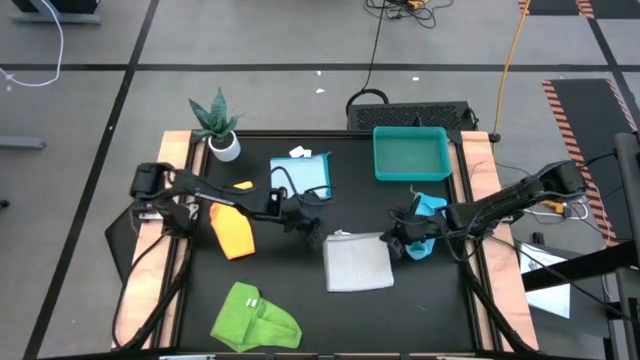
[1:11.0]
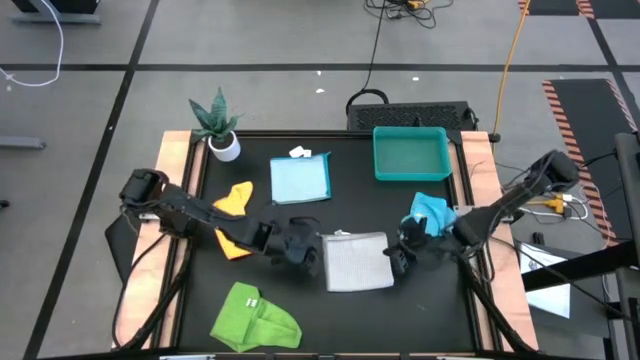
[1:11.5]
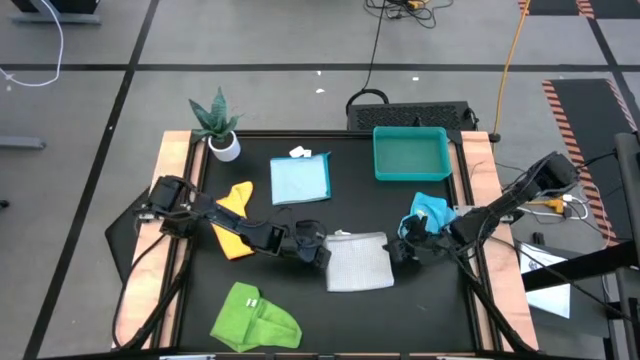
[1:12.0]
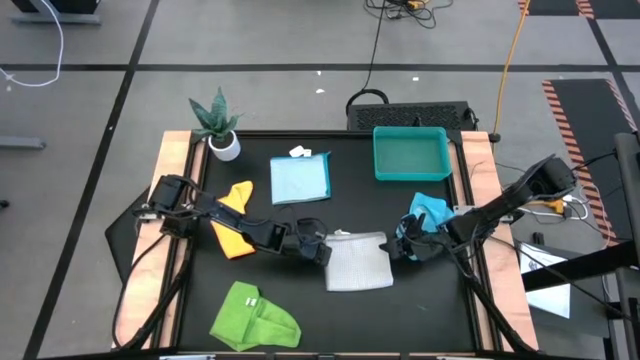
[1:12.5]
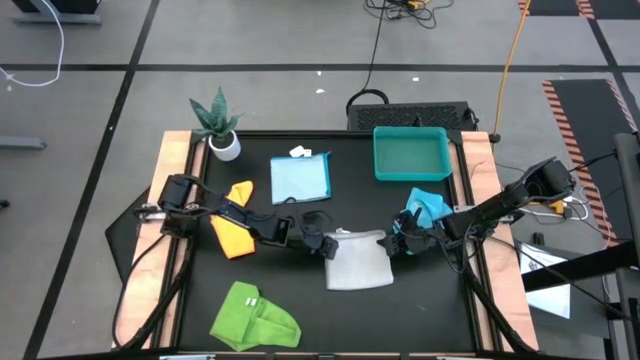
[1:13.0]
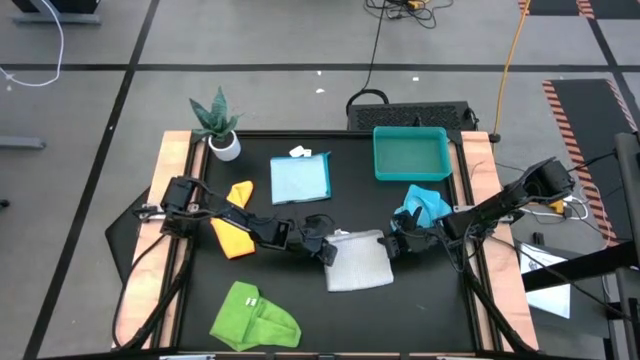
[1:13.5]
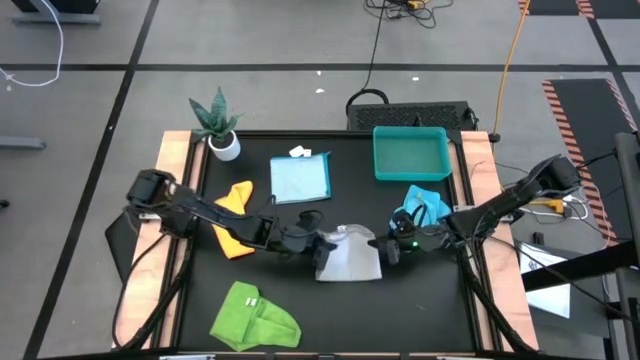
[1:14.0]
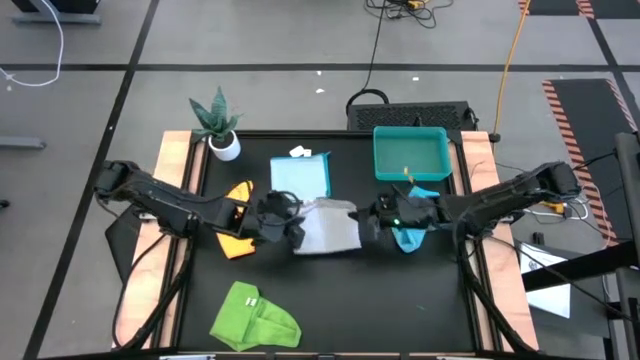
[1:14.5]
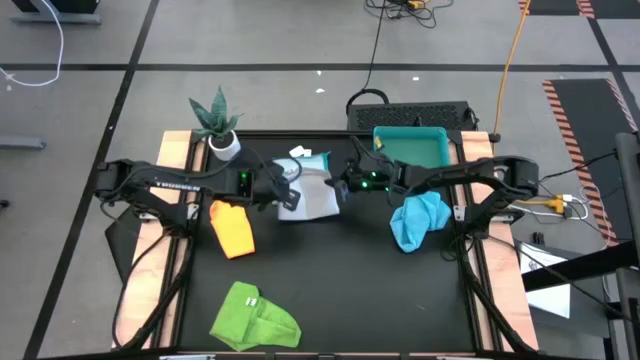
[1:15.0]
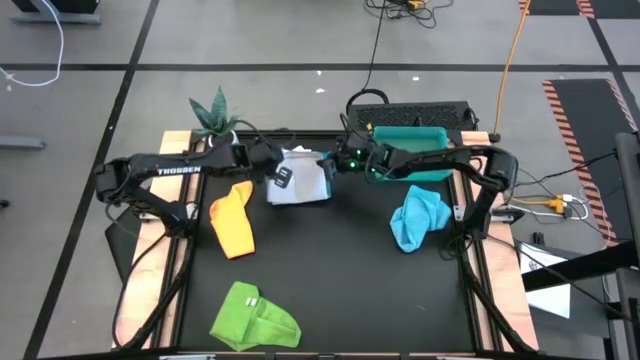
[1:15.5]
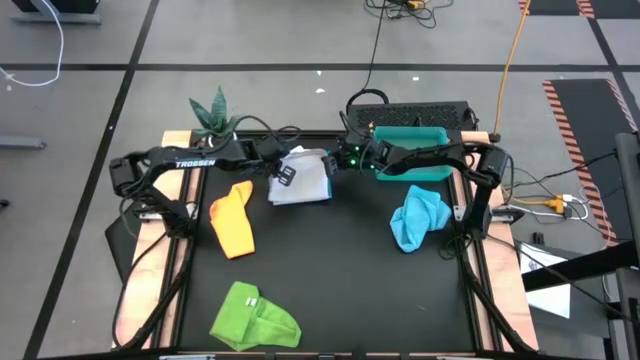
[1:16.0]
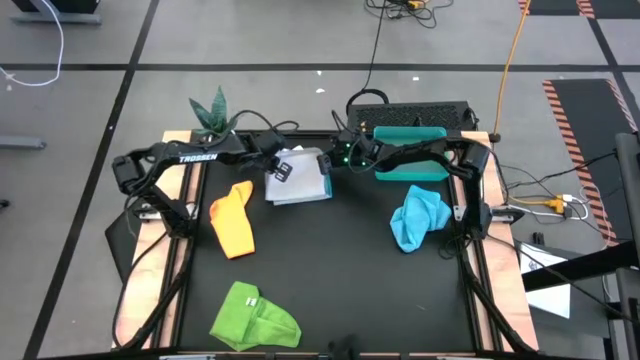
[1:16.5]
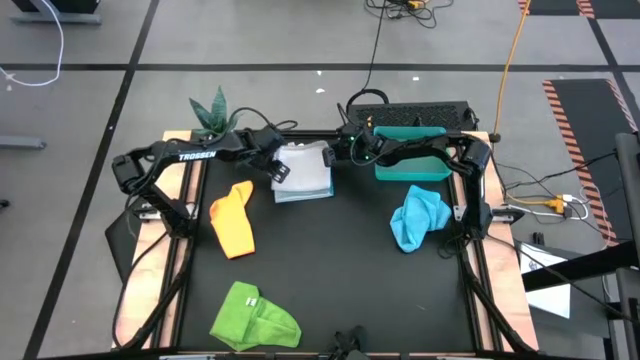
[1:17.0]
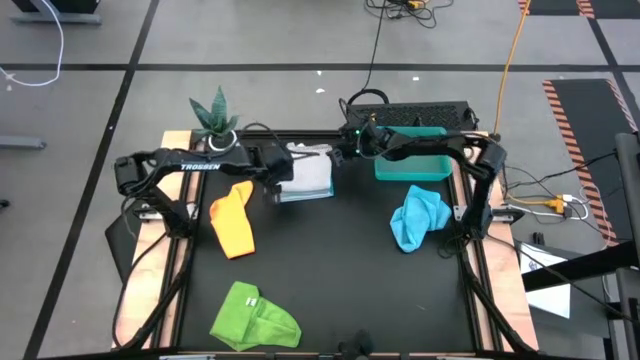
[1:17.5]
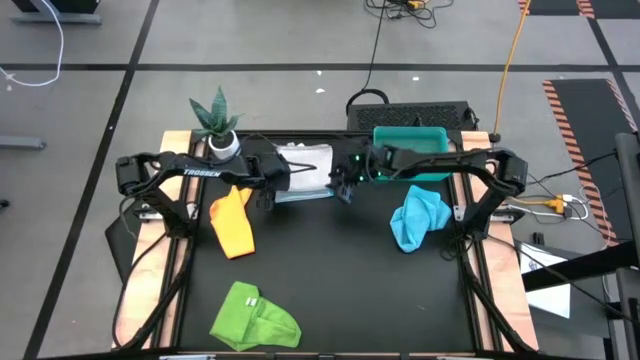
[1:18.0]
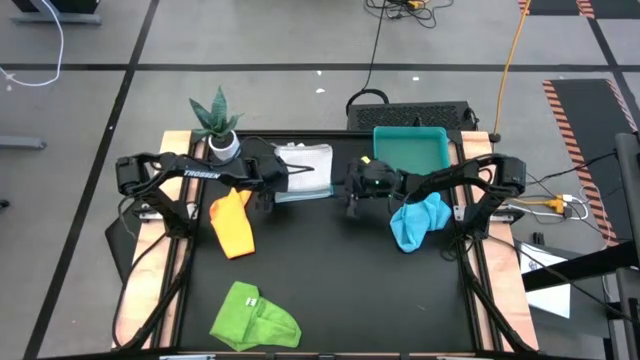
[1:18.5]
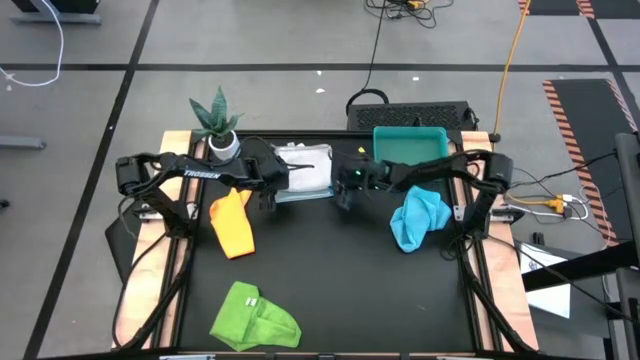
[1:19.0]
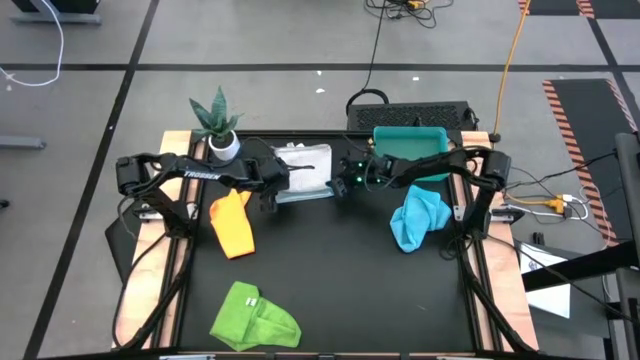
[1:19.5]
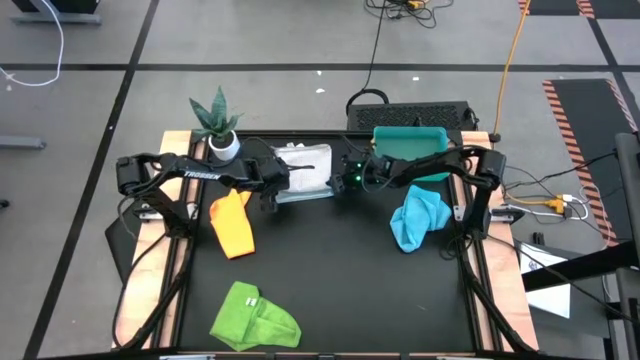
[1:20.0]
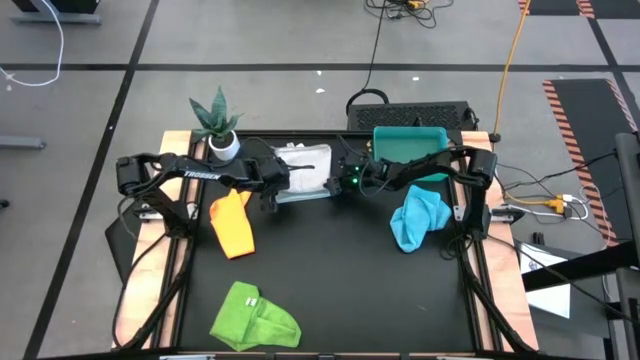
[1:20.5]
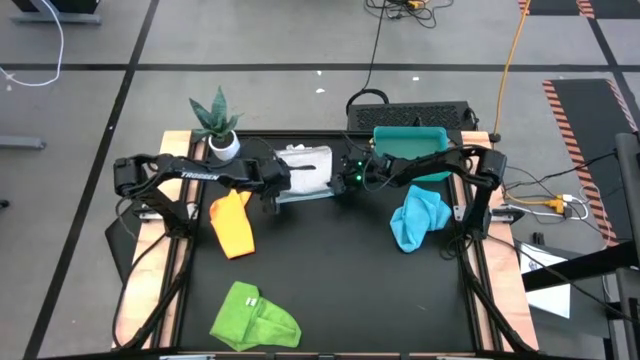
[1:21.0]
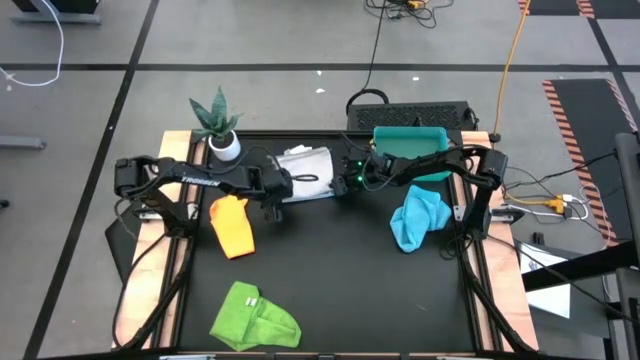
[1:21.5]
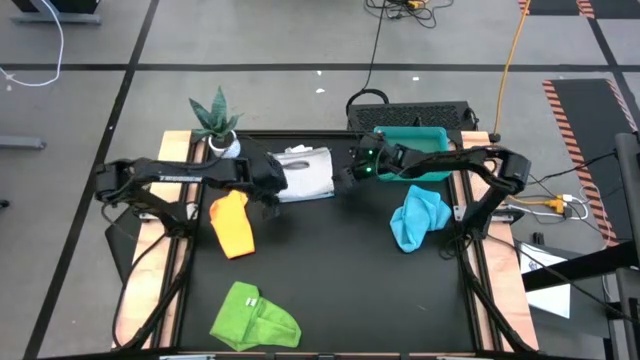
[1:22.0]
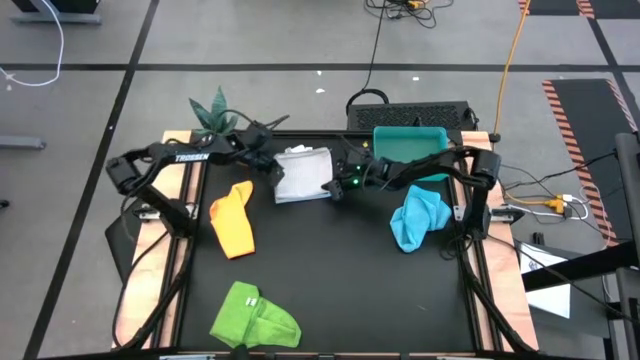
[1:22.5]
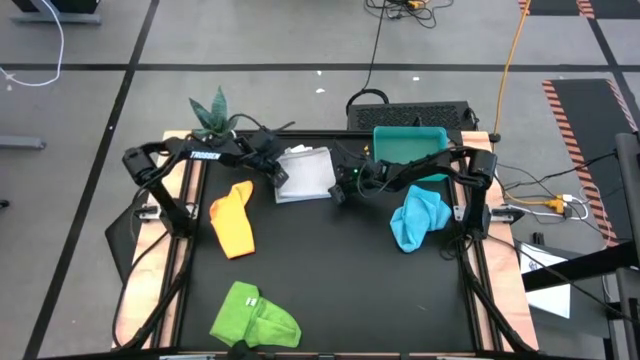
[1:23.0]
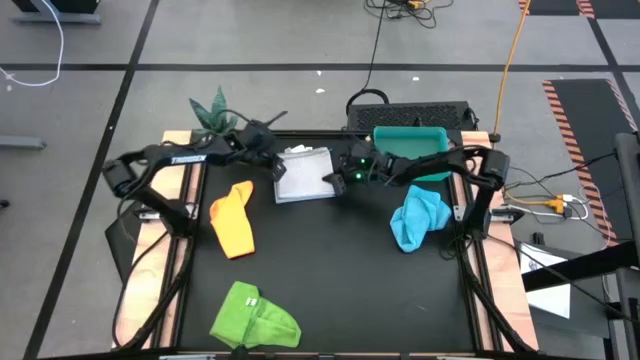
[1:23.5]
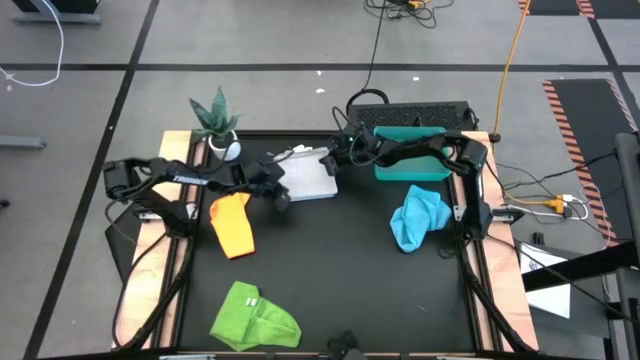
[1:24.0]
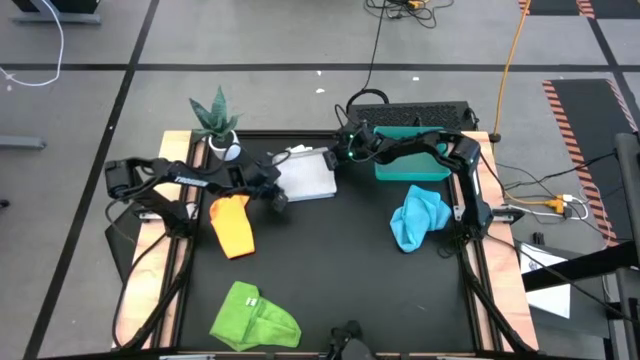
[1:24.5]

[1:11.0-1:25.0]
Task: Fold microfiber towels
Stack the gray microfiber towel on the blue microfiber towel

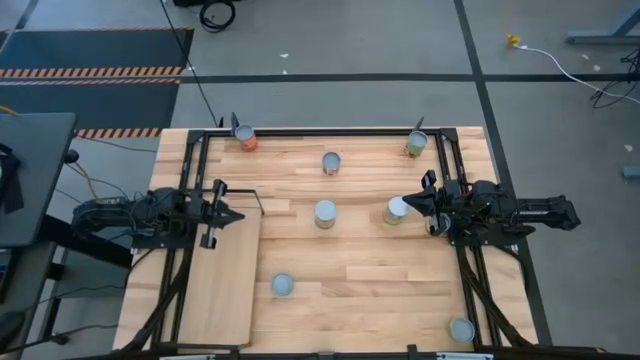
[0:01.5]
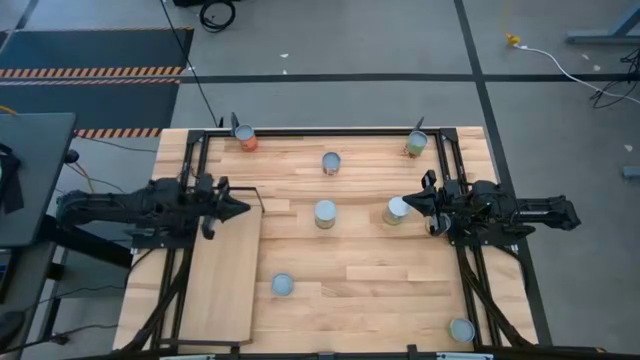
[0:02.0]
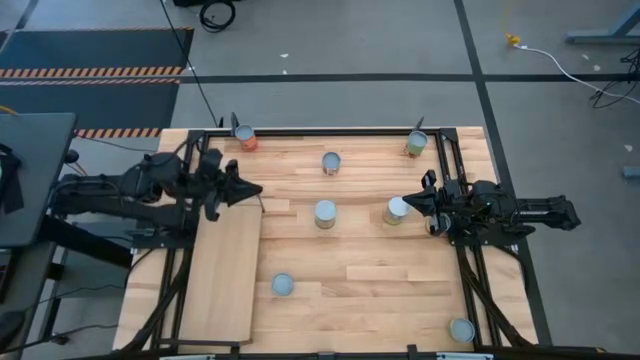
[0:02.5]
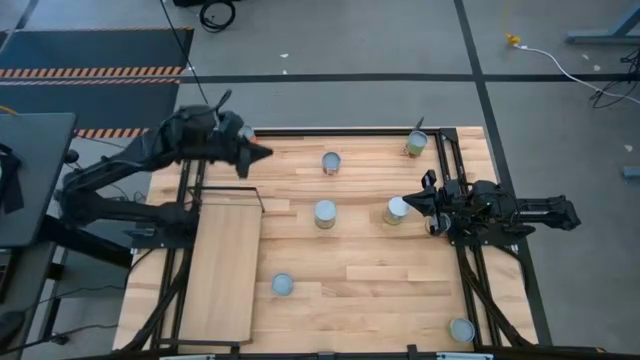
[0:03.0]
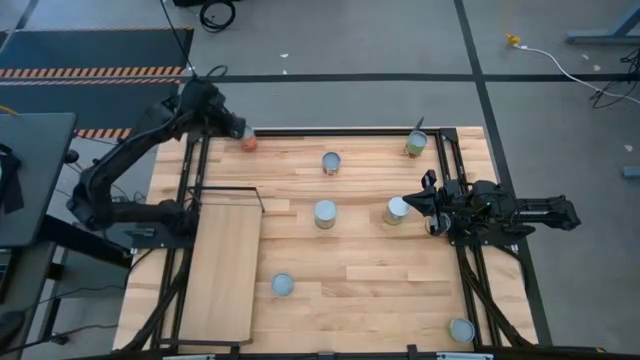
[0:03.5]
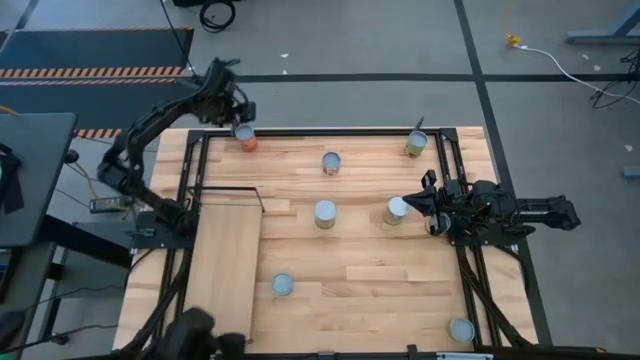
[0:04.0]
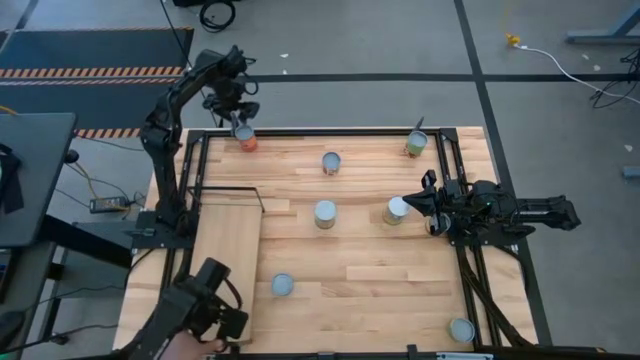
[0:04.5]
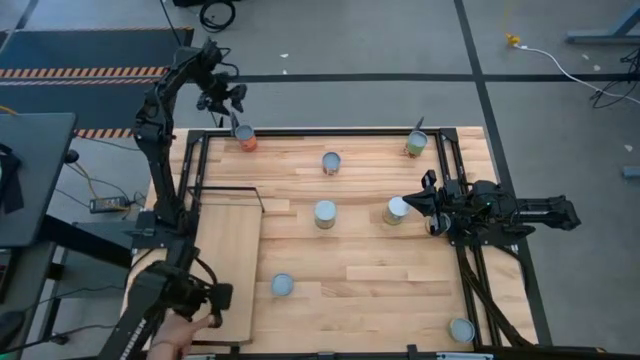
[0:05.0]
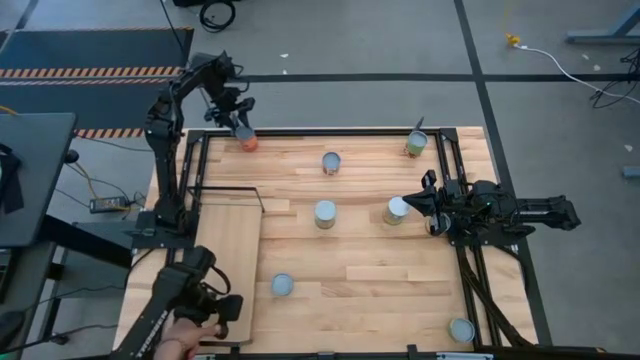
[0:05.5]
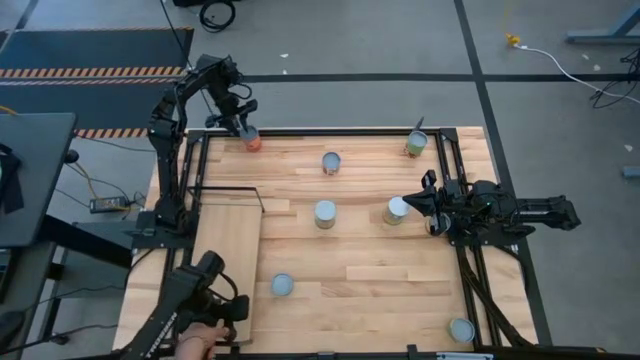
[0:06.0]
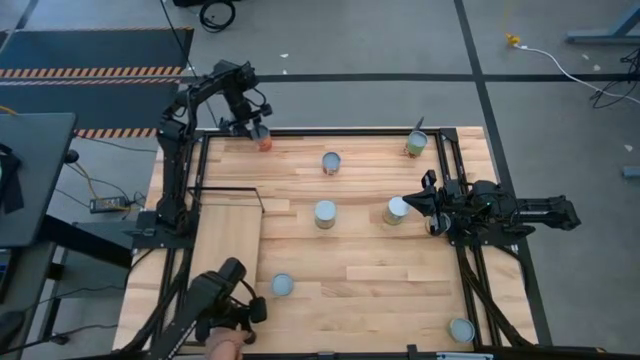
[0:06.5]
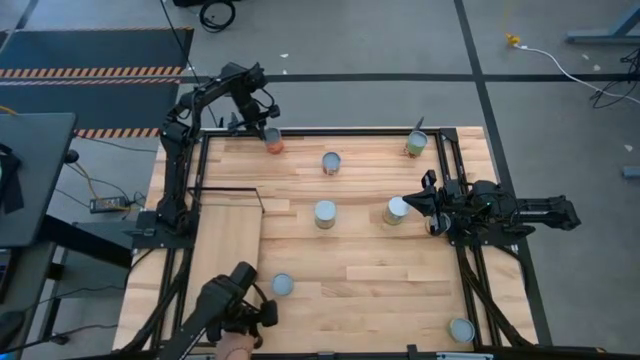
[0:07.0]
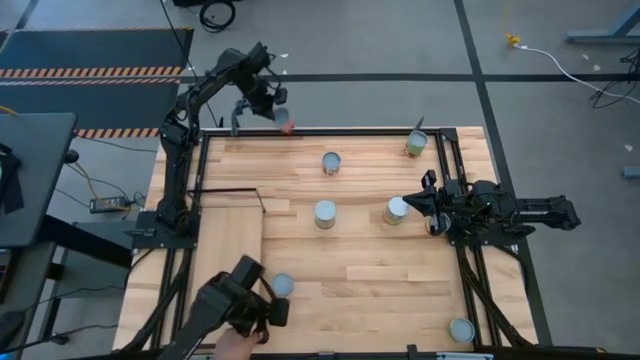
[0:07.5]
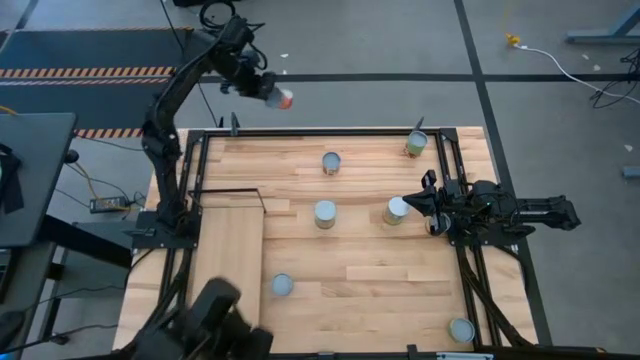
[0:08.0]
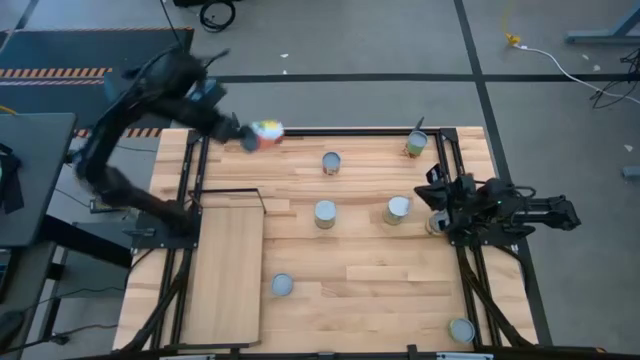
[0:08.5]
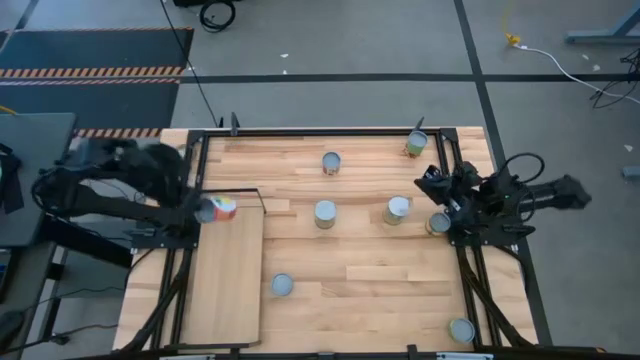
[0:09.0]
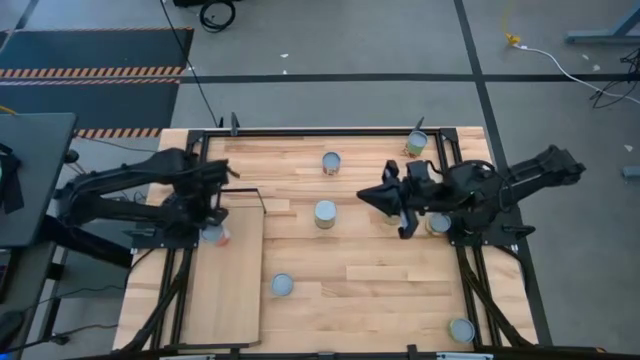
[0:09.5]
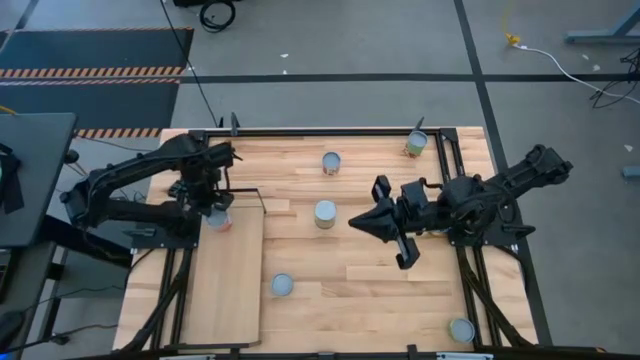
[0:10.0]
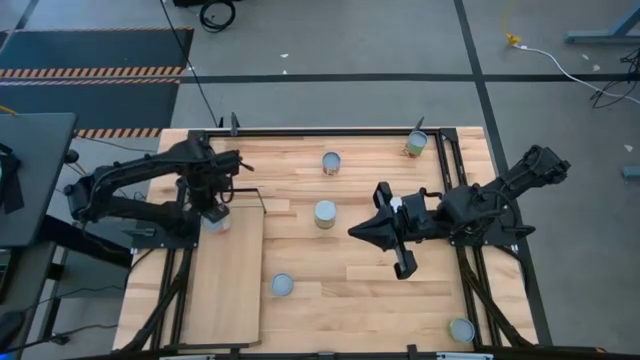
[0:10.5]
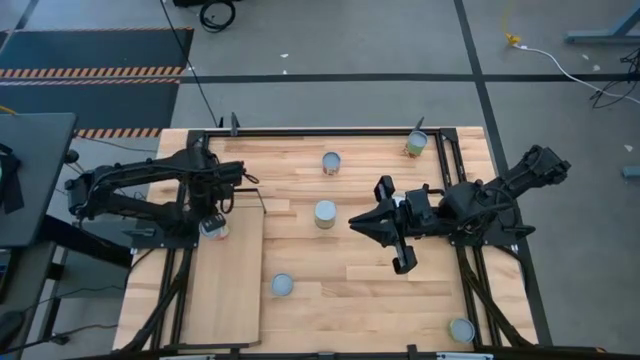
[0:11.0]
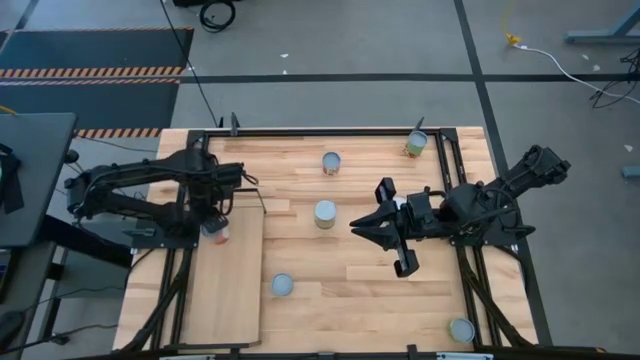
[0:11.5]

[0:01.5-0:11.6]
Task: Pick and place cans onto a shelf
Put the orange can on the shelf
